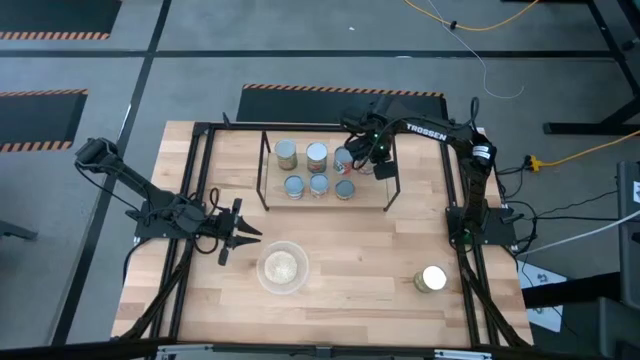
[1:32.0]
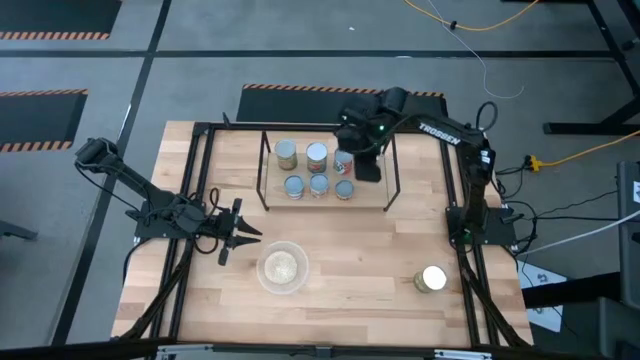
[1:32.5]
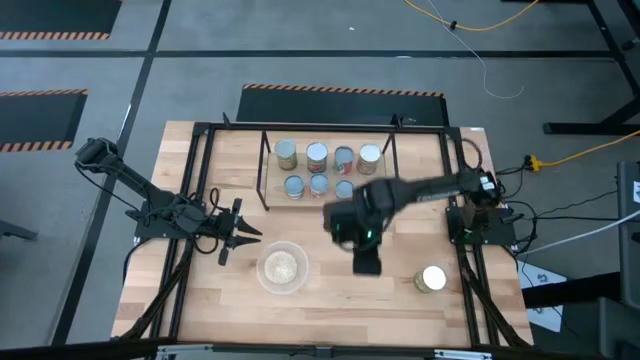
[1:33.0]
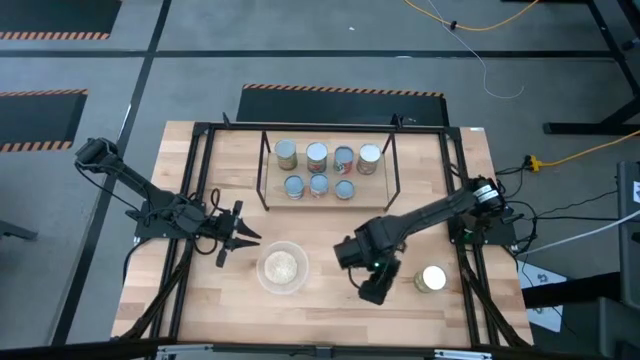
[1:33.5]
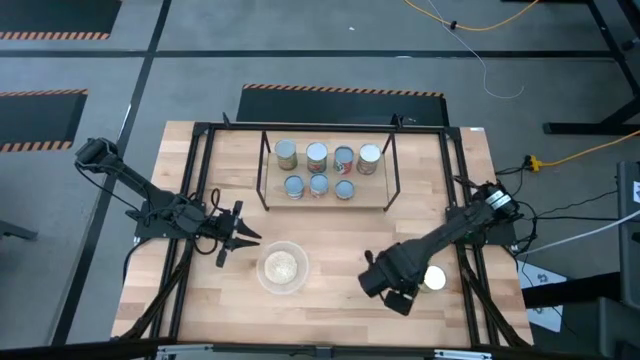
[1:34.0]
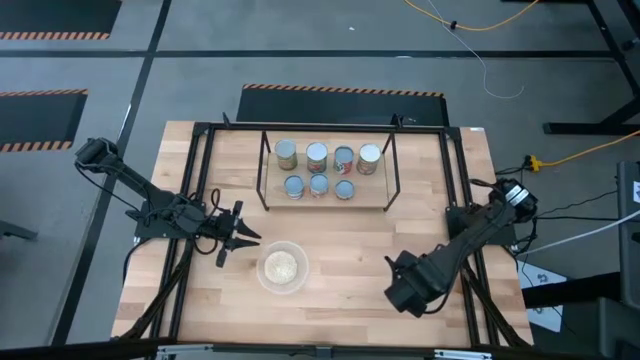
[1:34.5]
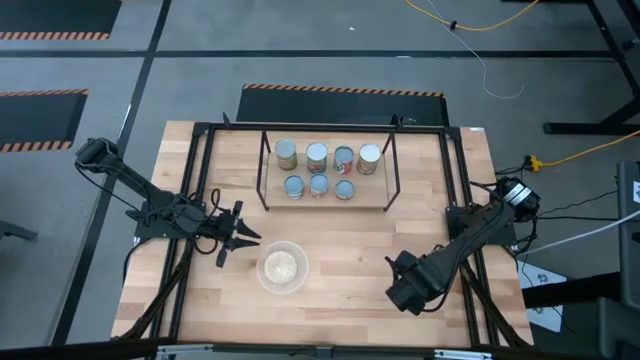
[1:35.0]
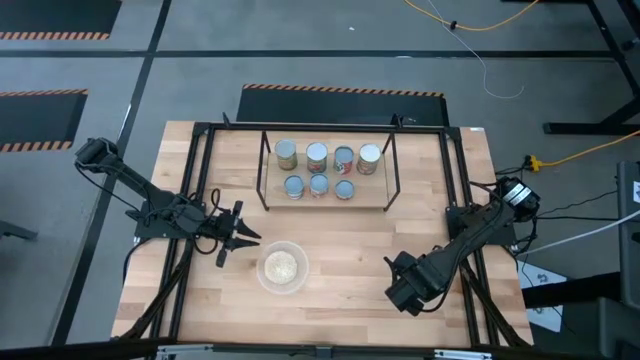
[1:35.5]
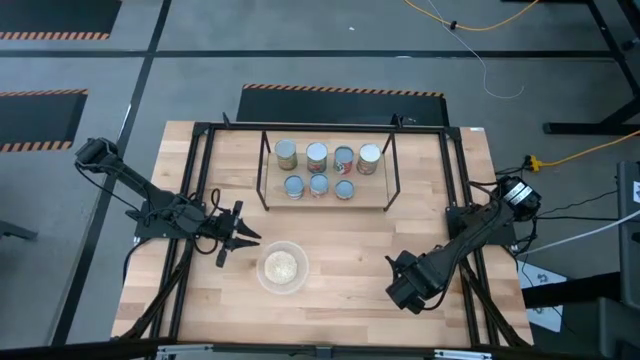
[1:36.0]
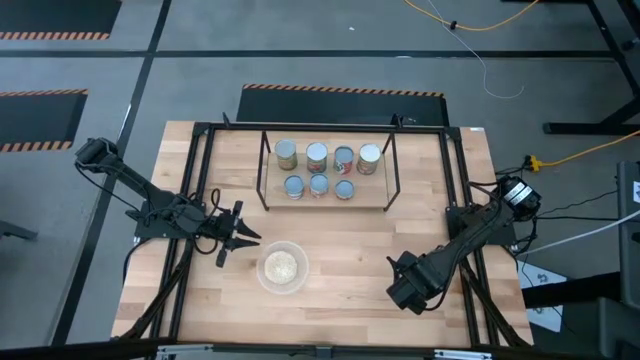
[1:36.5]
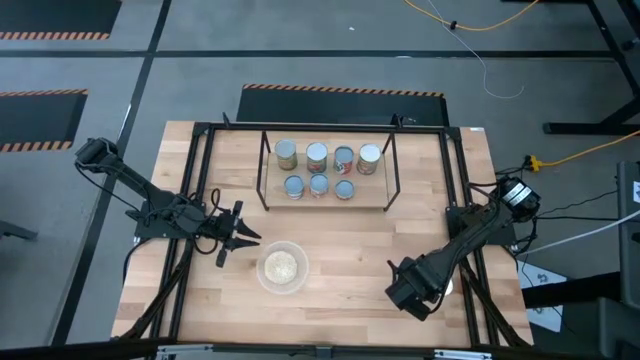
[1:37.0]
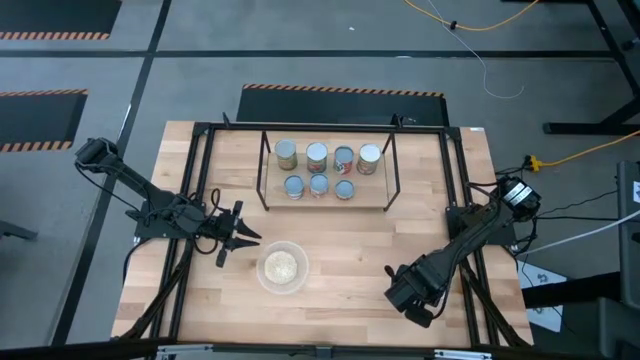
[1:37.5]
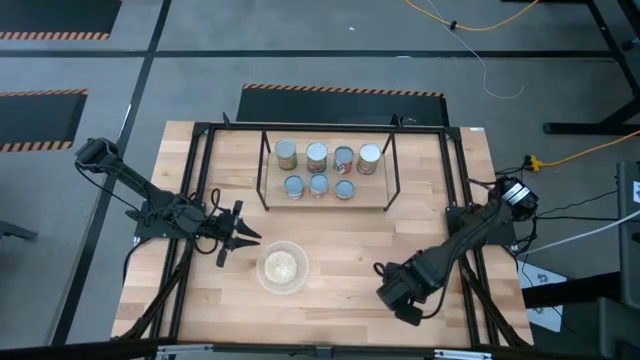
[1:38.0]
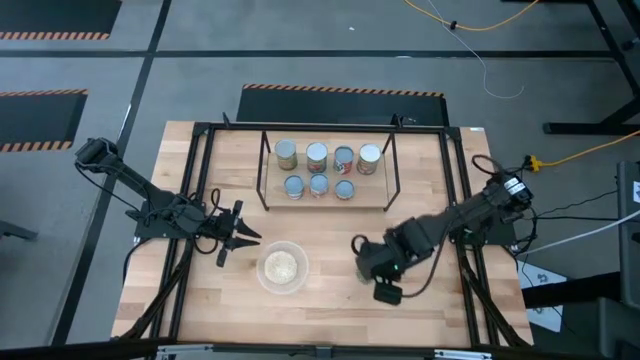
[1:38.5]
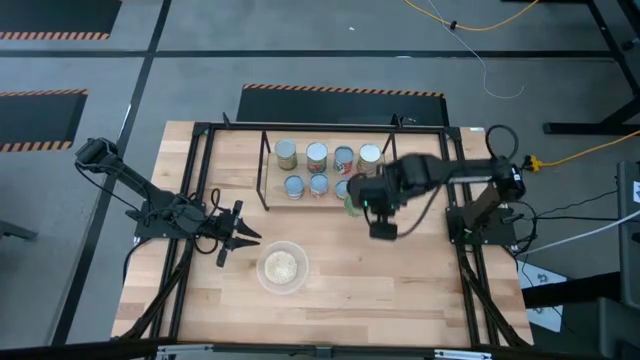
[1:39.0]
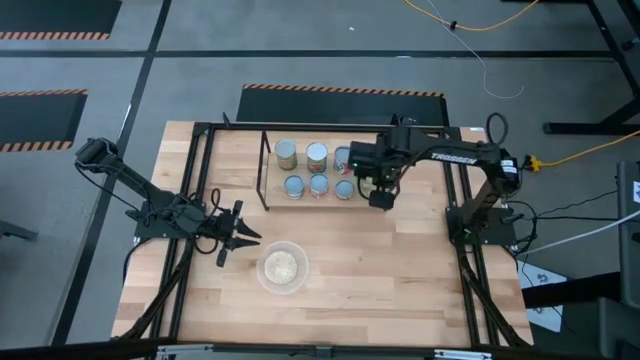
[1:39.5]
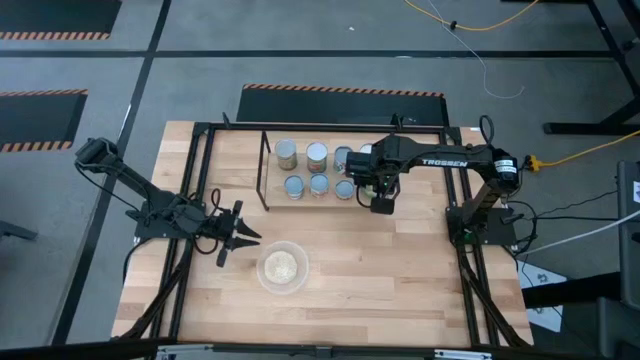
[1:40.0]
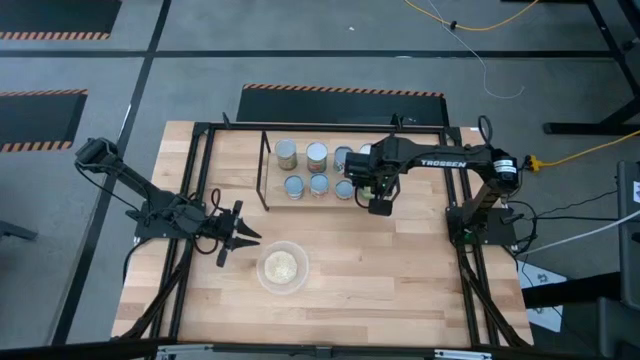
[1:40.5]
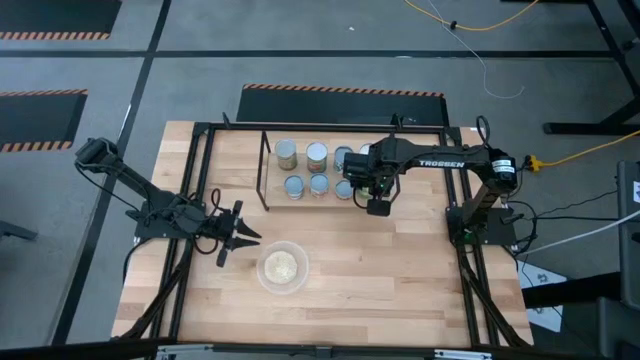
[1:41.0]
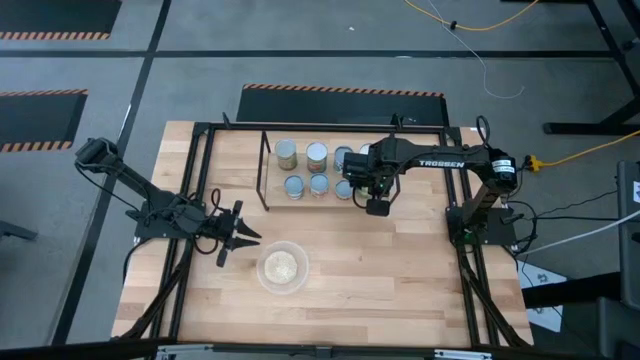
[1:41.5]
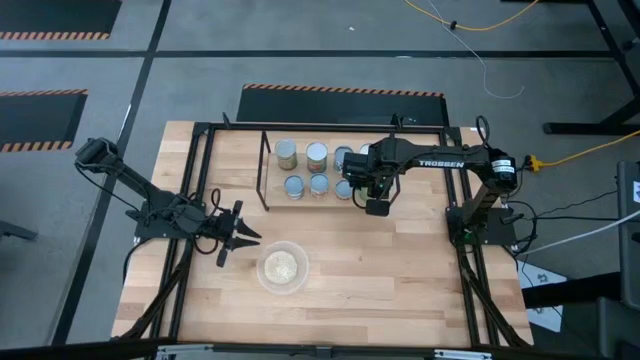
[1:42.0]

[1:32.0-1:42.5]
Task: Pick and place cans onto a shelf
Put the canned pears on the shelf

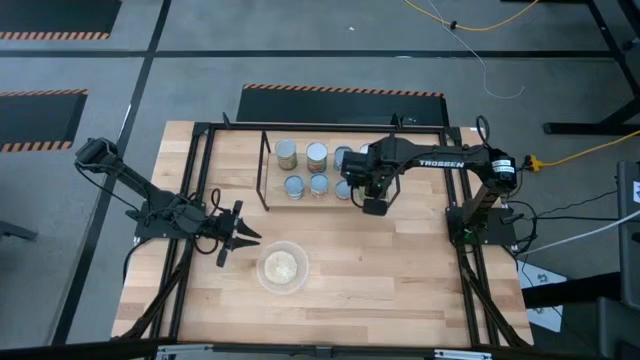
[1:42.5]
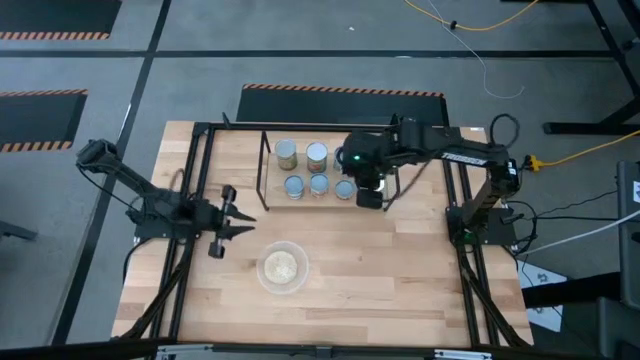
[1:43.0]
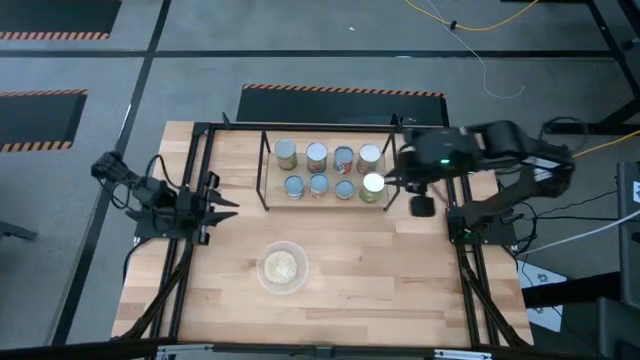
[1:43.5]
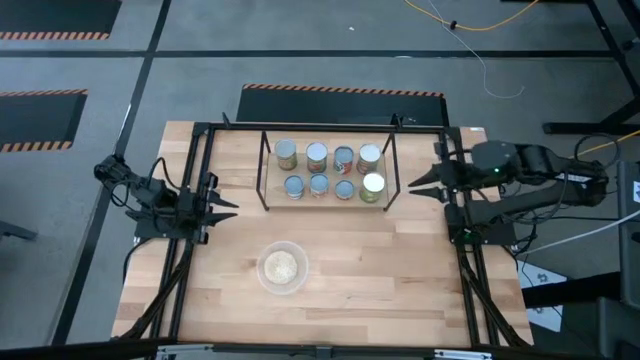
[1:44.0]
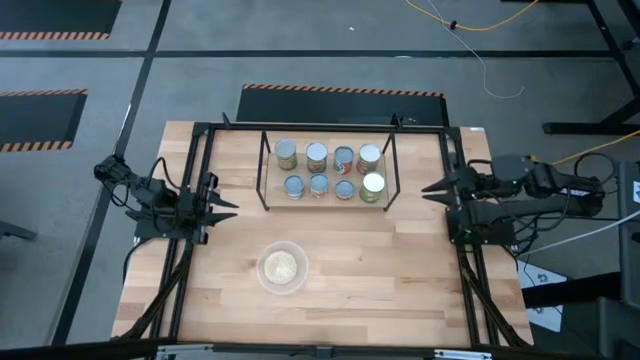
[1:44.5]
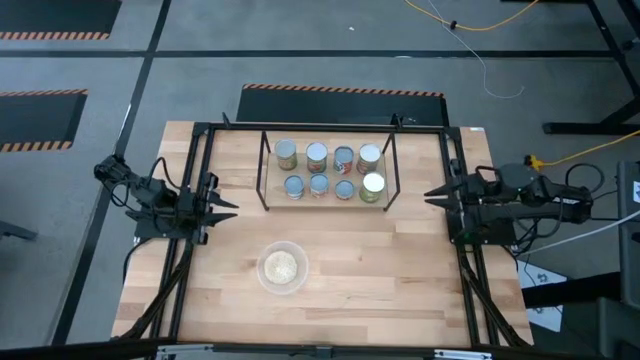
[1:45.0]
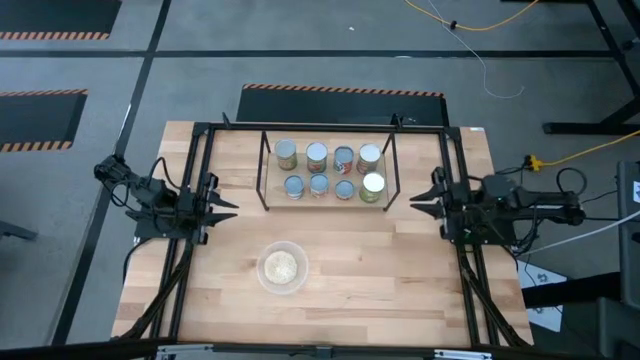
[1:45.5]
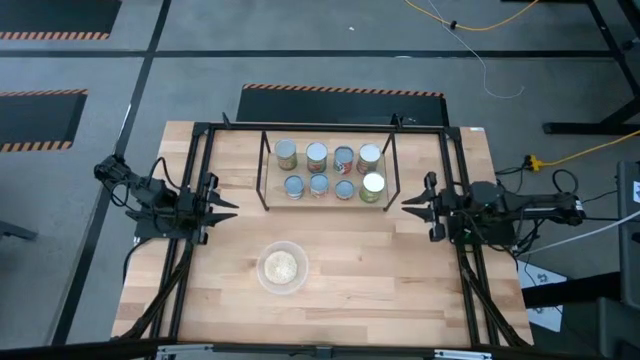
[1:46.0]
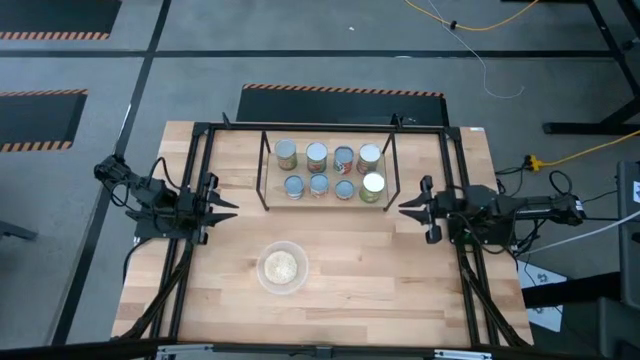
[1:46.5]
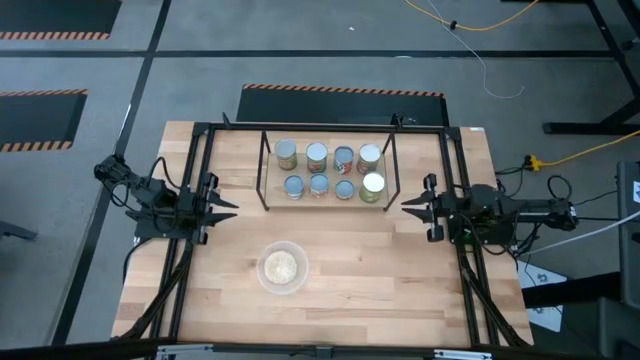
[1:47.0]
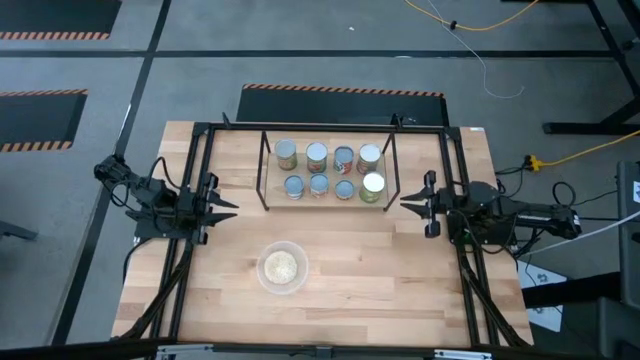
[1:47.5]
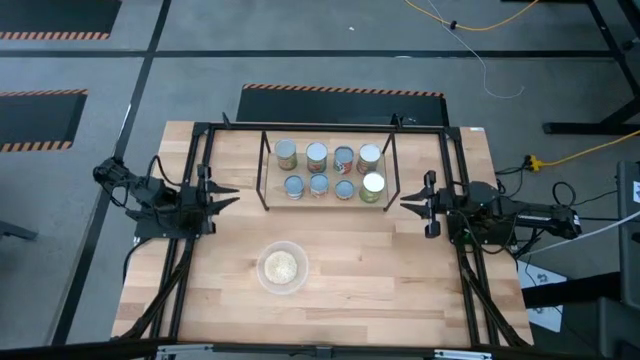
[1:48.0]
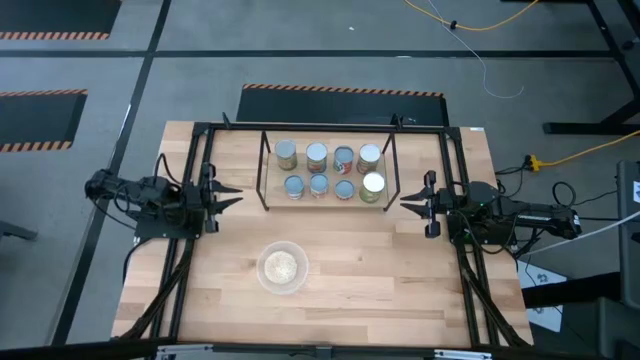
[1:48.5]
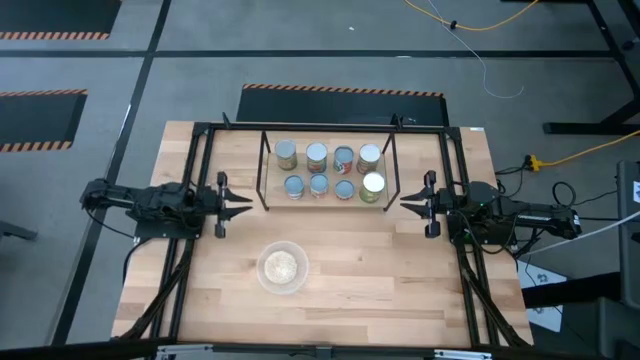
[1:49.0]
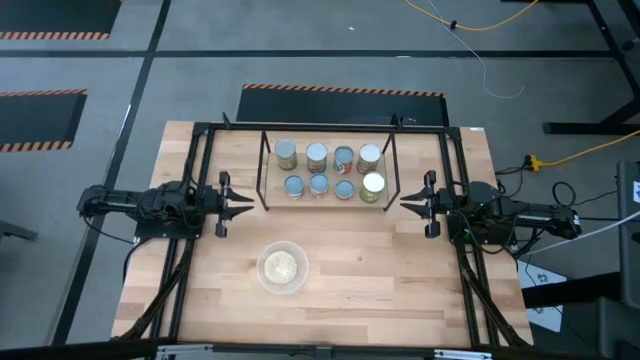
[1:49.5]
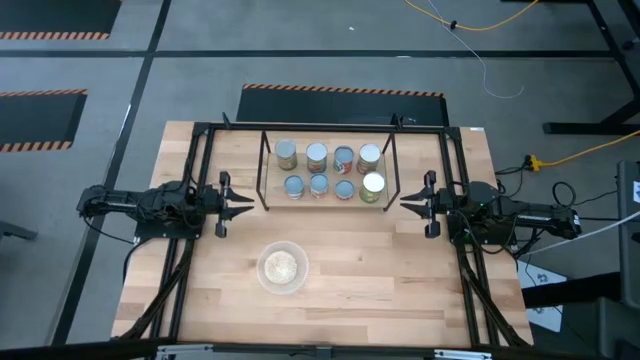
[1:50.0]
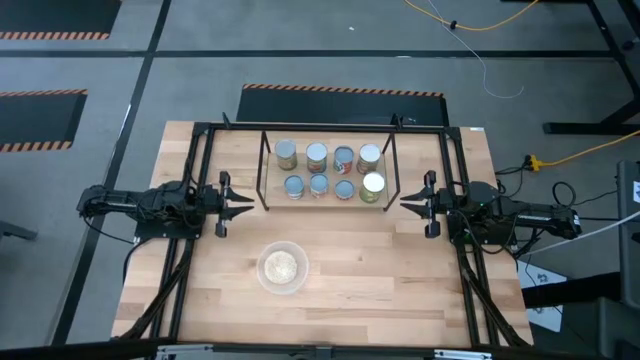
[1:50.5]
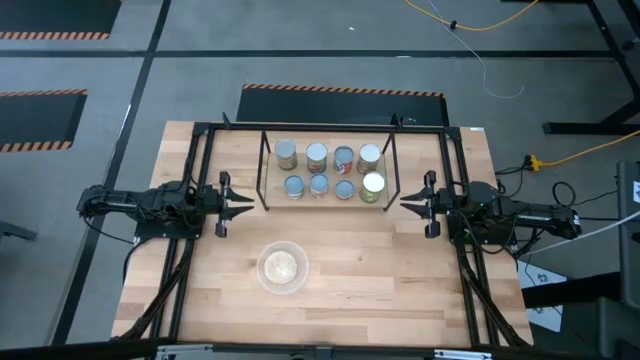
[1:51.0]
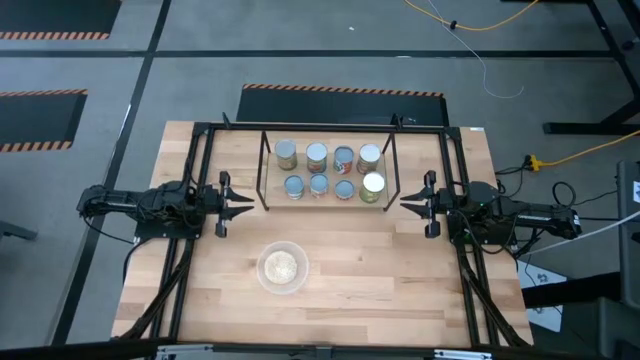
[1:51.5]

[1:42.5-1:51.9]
Return to Home Position

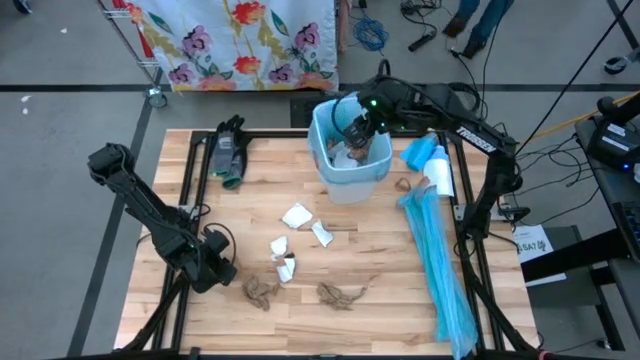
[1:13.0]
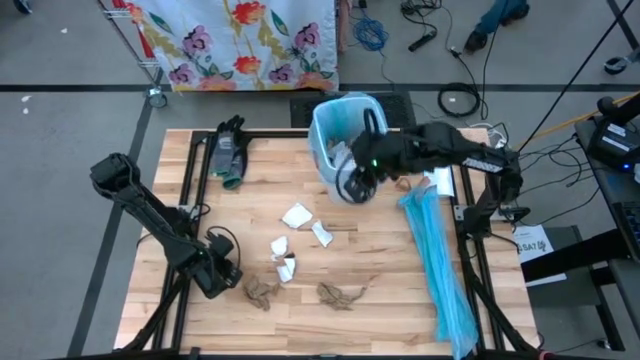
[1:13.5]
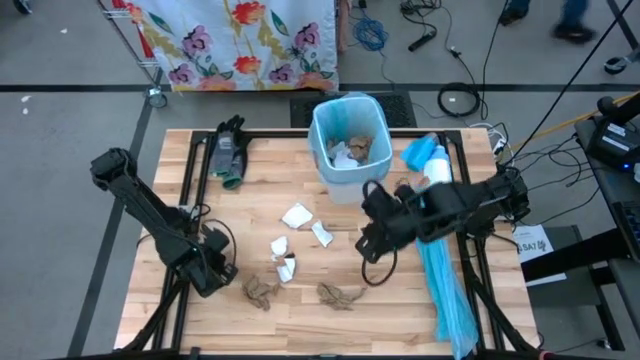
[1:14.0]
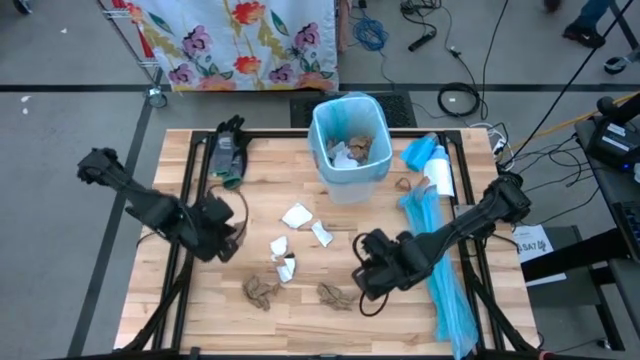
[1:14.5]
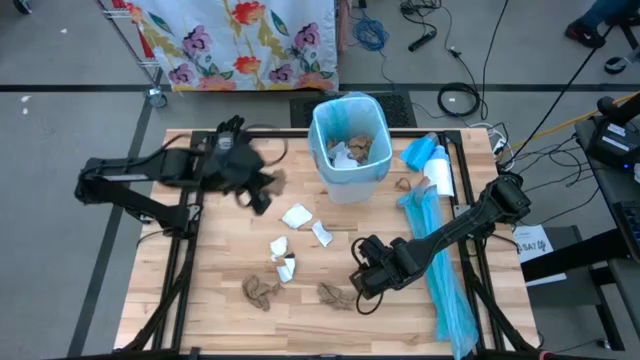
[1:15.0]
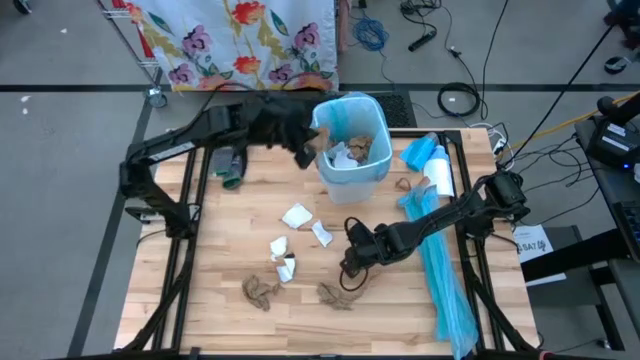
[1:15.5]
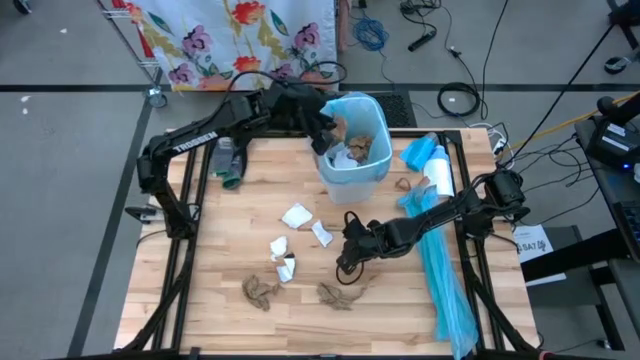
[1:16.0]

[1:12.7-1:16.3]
Task: place trash/remove bag and relplace
Put the brown napkin into the trash bin
